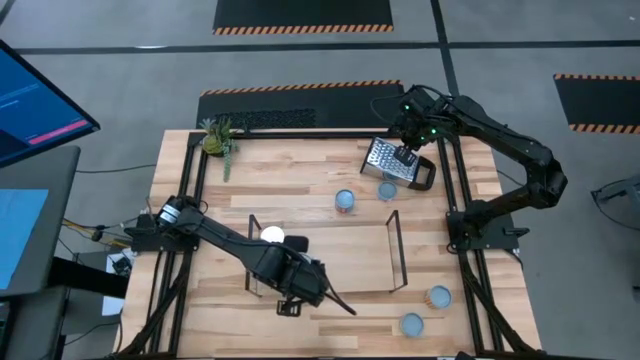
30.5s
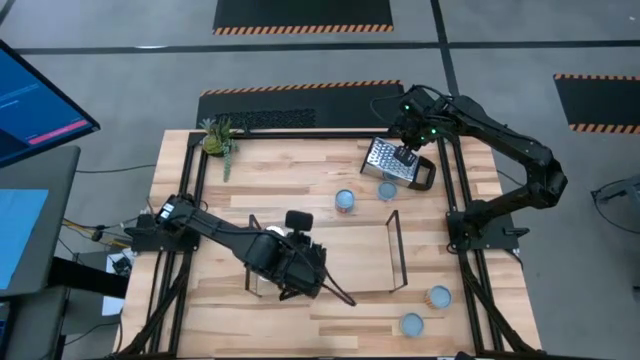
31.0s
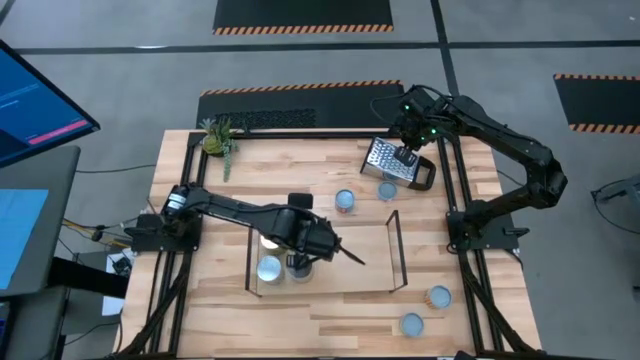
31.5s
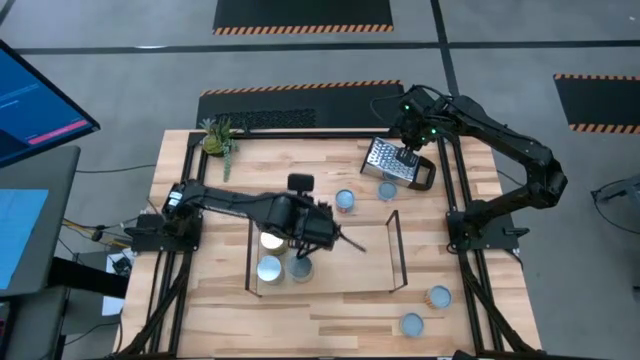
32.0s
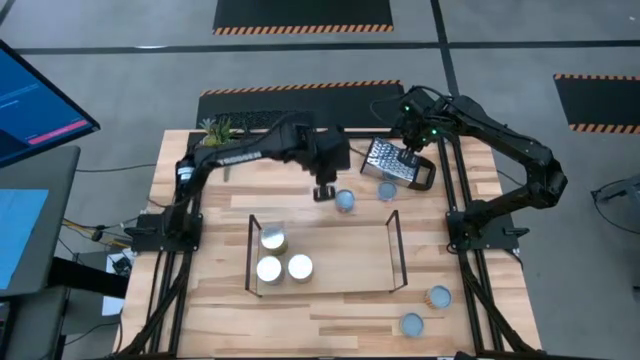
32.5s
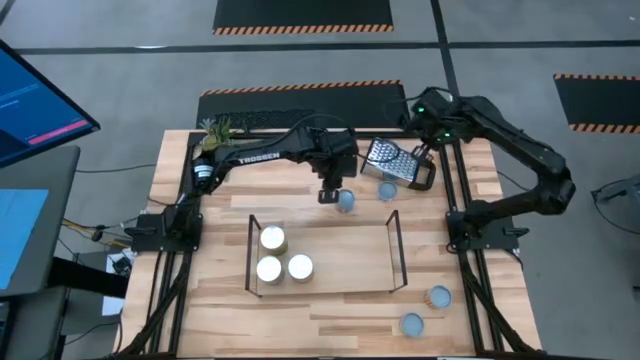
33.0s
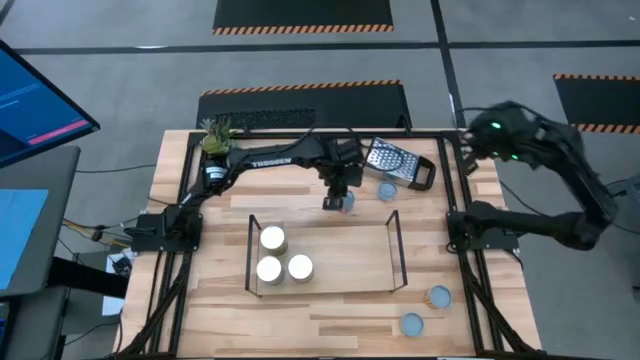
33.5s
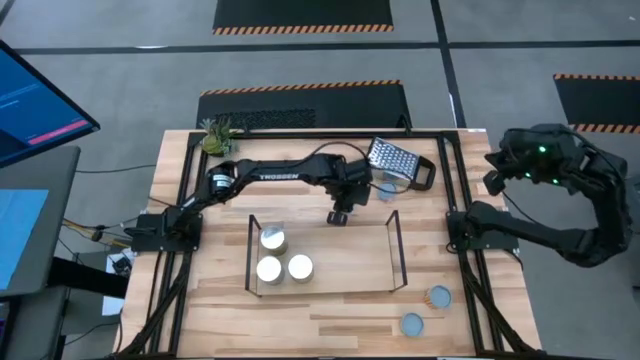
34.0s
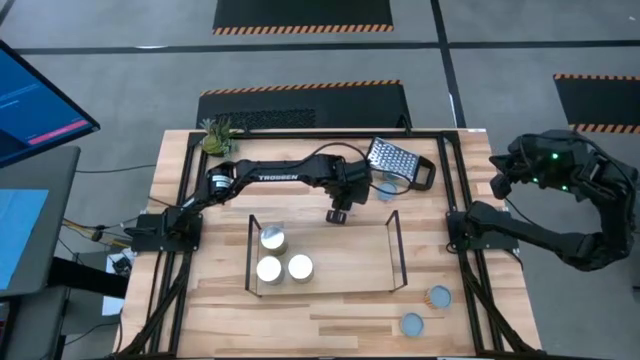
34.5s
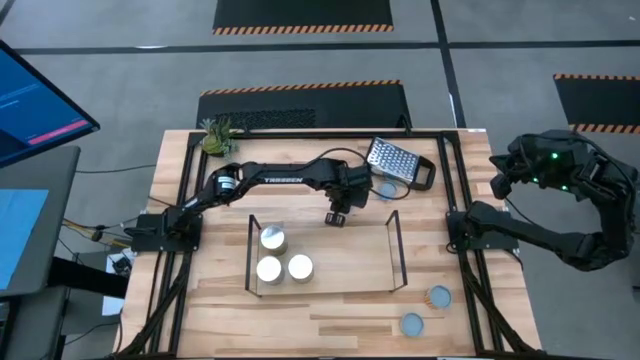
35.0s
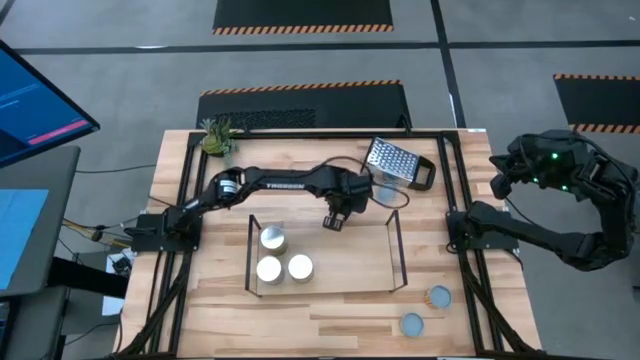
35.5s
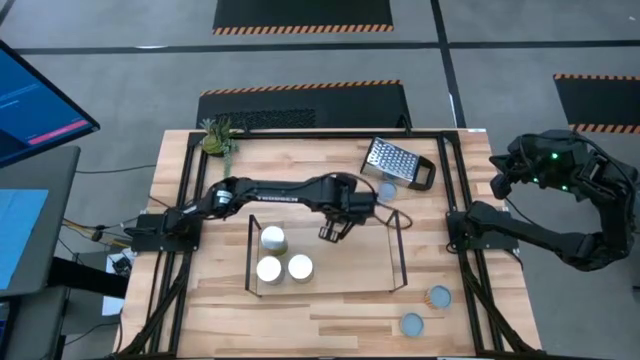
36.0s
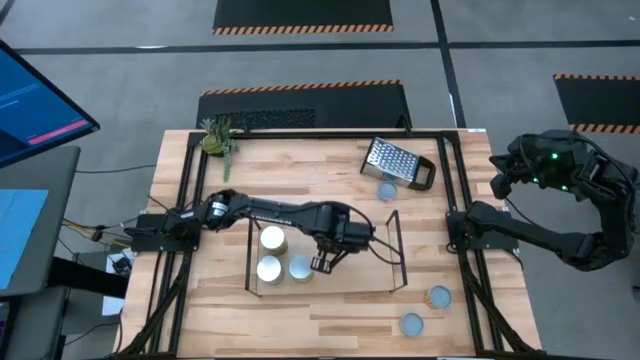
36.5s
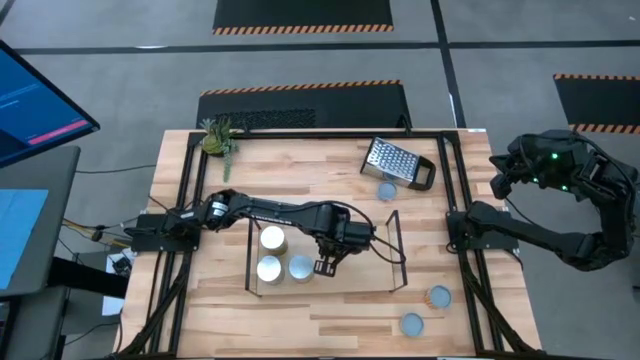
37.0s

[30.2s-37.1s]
Task: Pick and place cans onto a shelf
Put the canned spicy black beans on the shelf

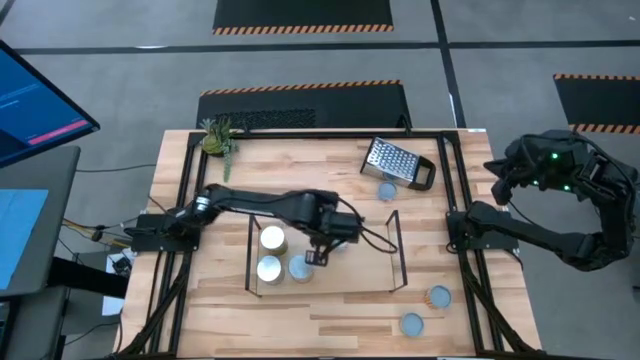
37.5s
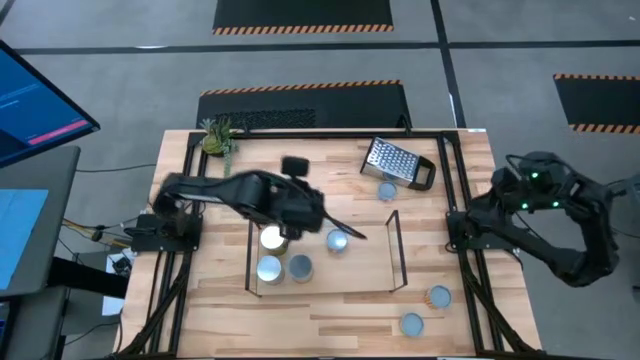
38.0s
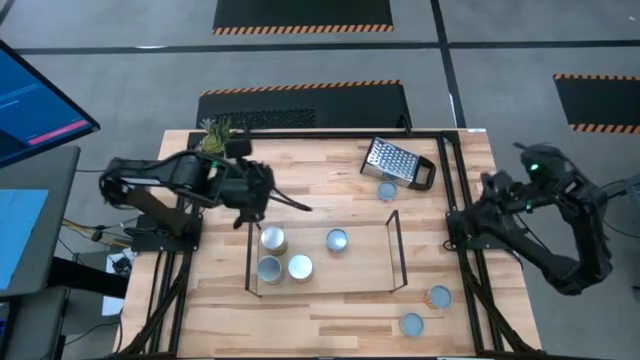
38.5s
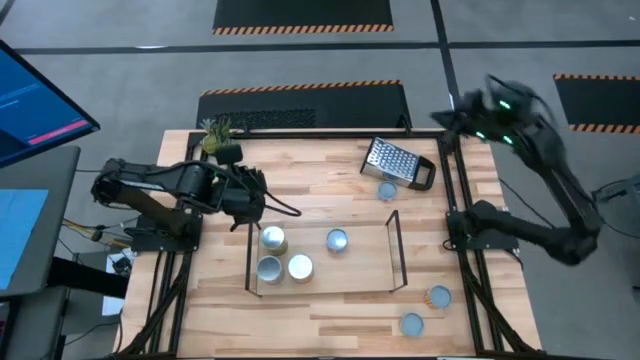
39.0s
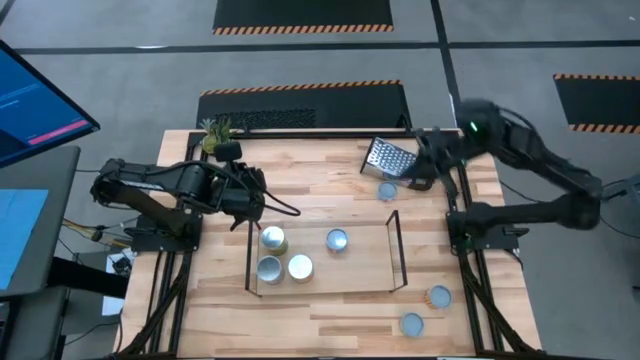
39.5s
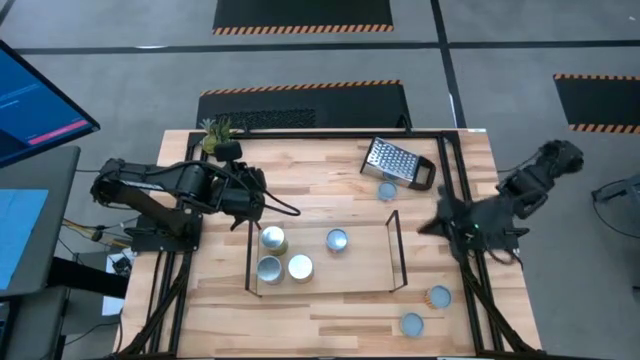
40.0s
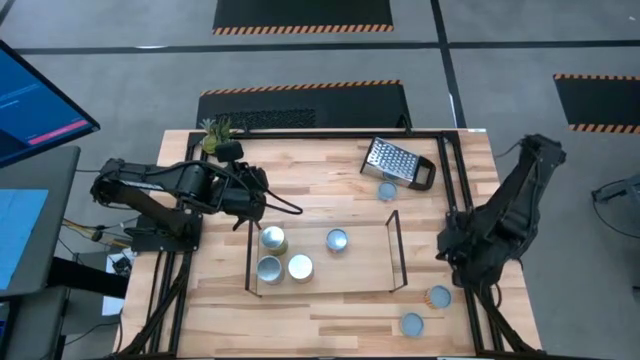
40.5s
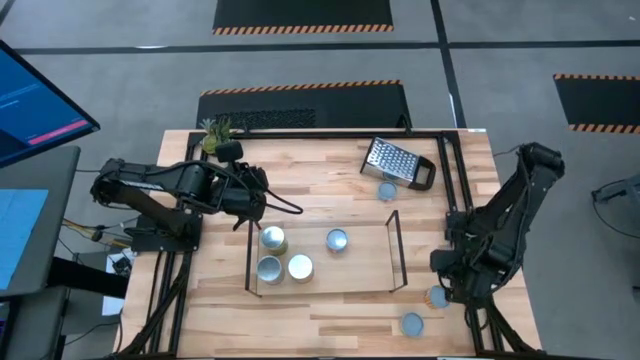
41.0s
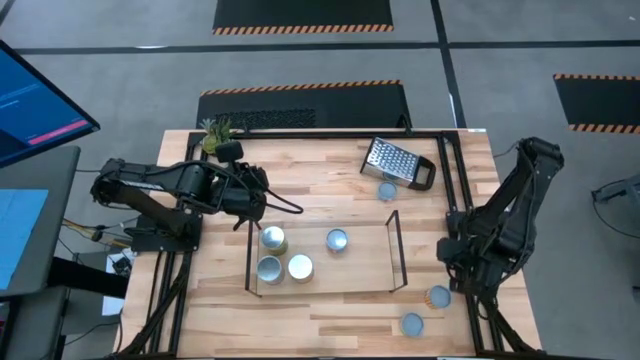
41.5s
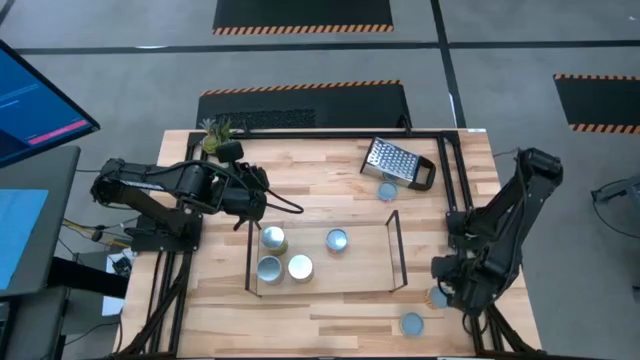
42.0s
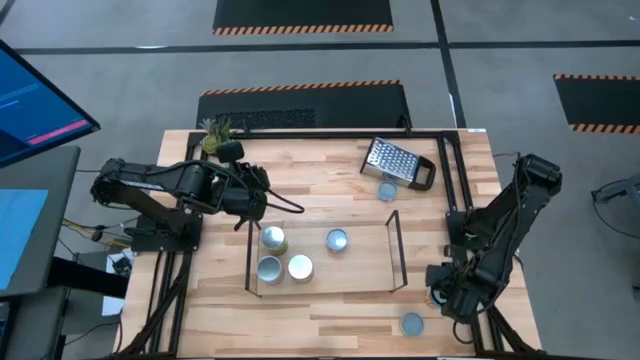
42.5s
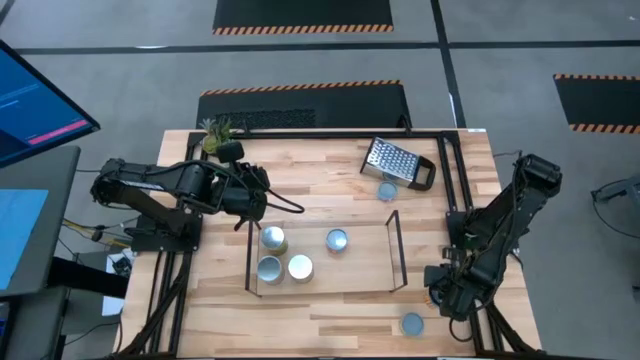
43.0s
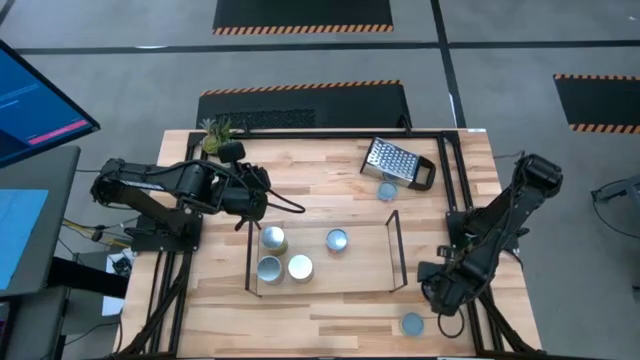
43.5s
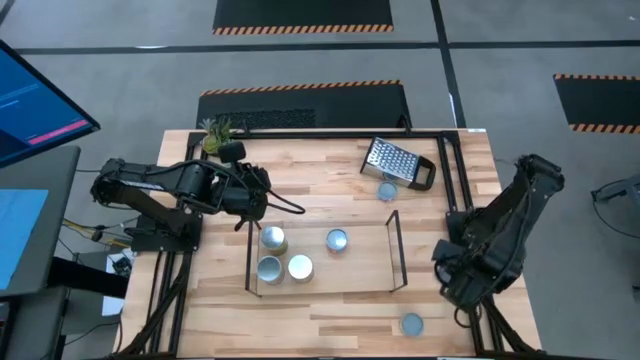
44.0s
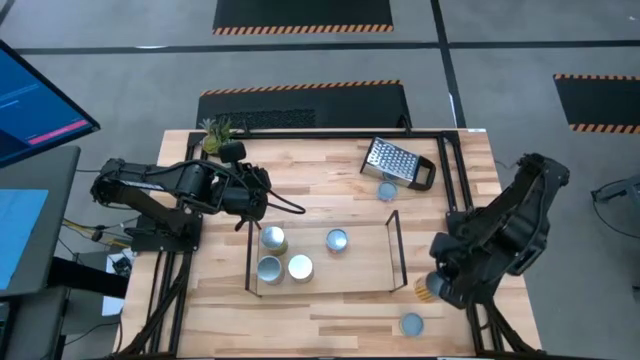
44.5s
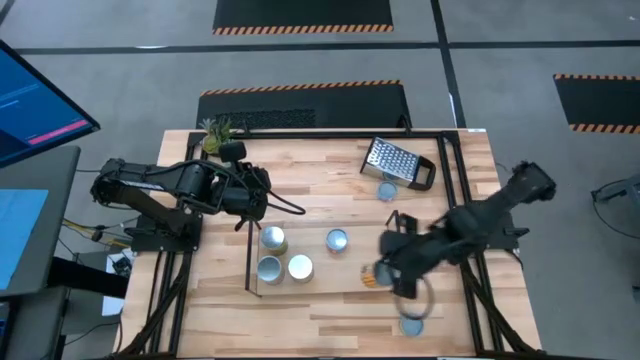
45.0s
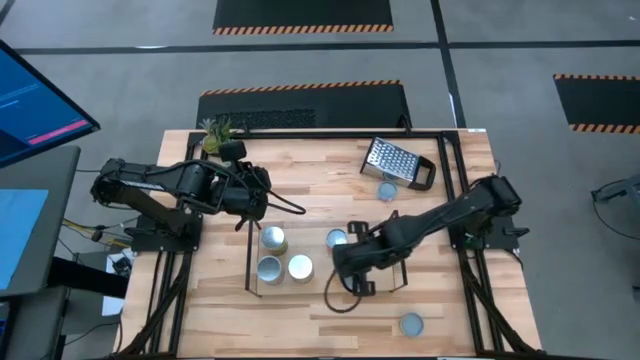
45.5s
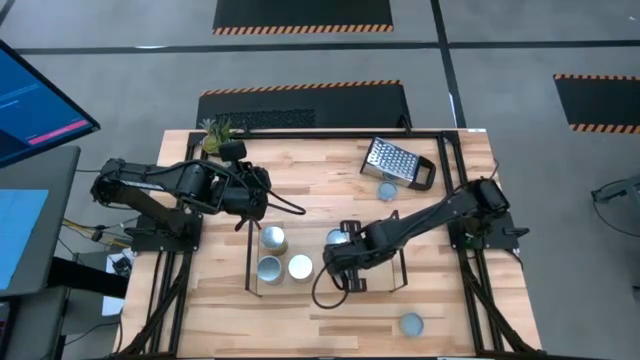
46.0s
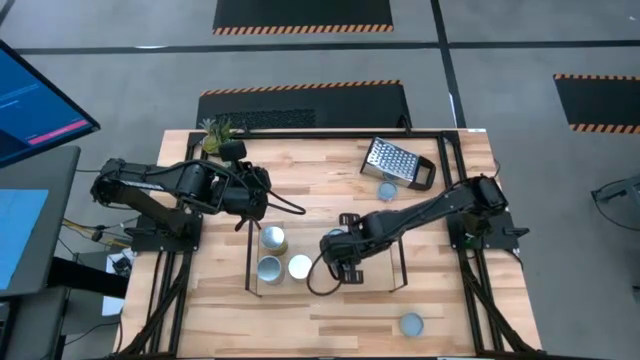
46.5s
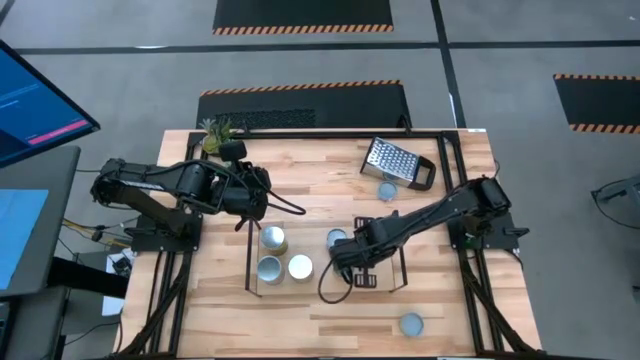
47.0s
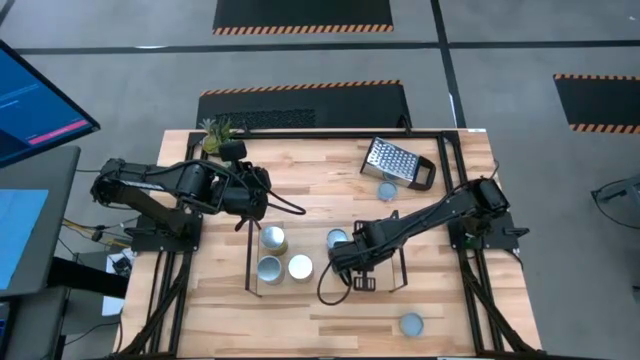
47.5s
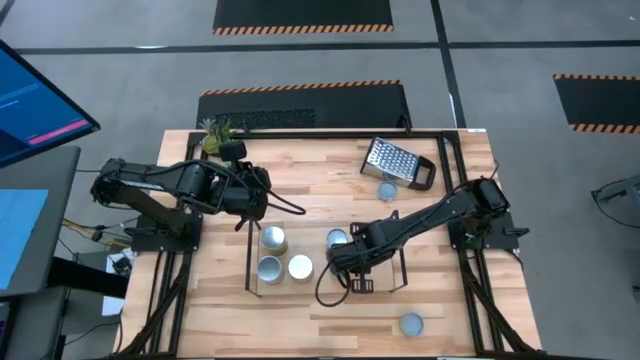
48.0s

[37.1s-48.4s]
Put the yellow can on the shelf

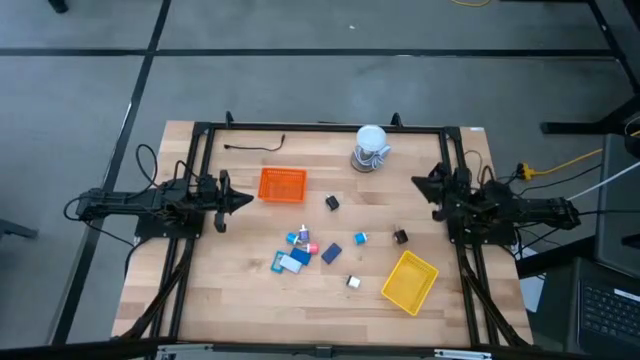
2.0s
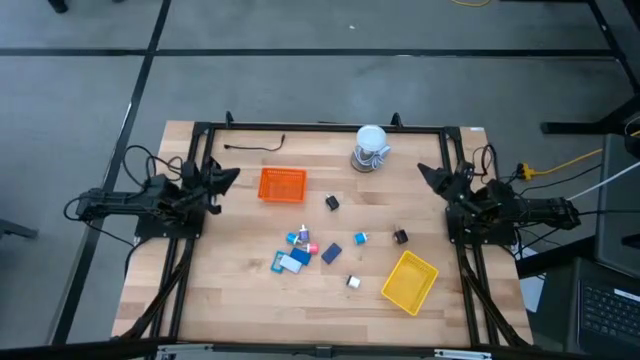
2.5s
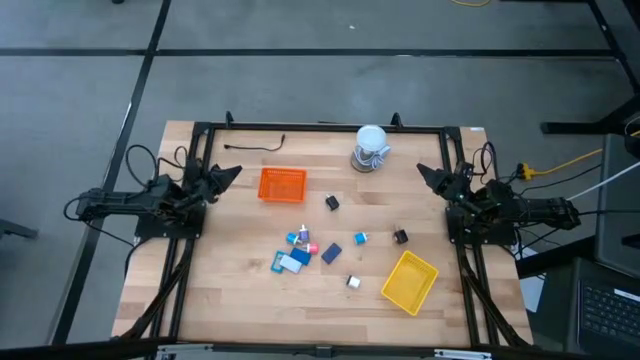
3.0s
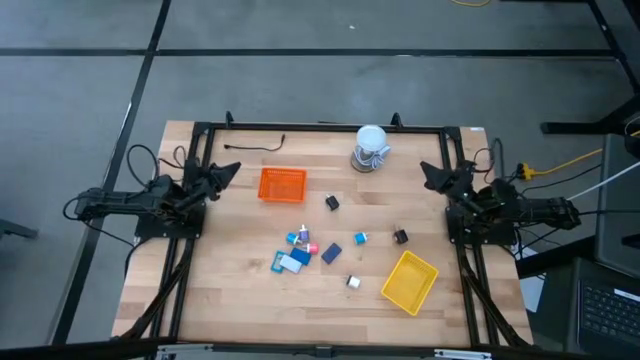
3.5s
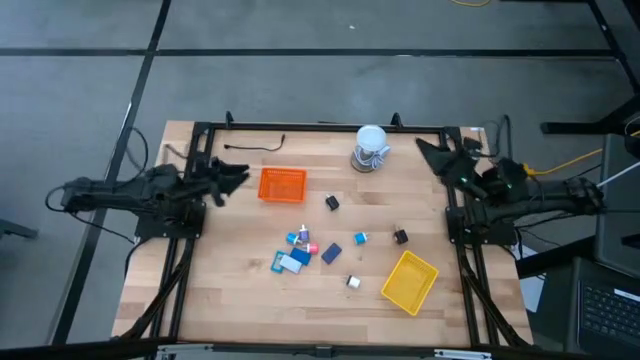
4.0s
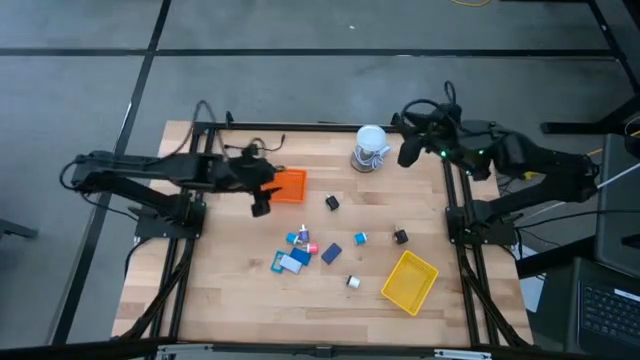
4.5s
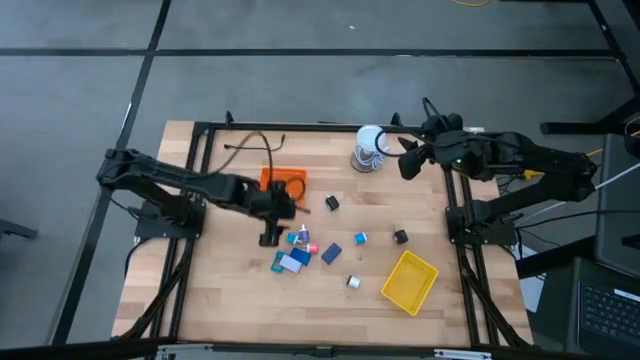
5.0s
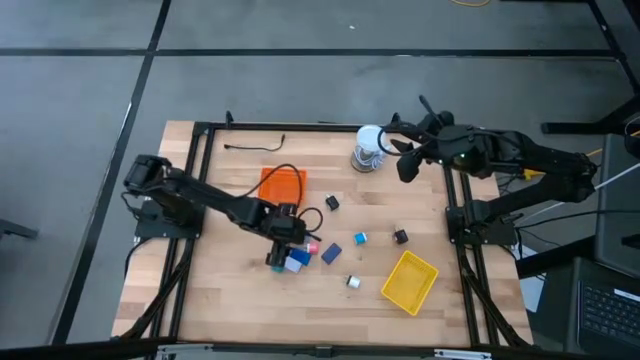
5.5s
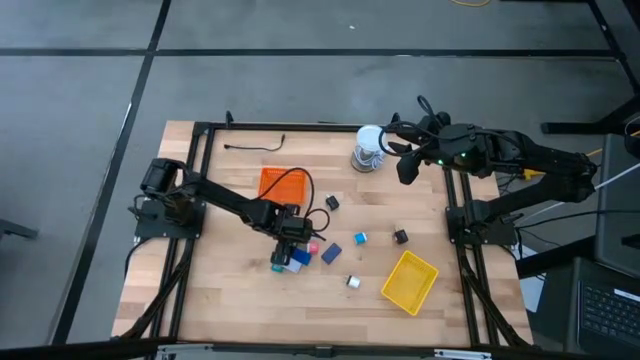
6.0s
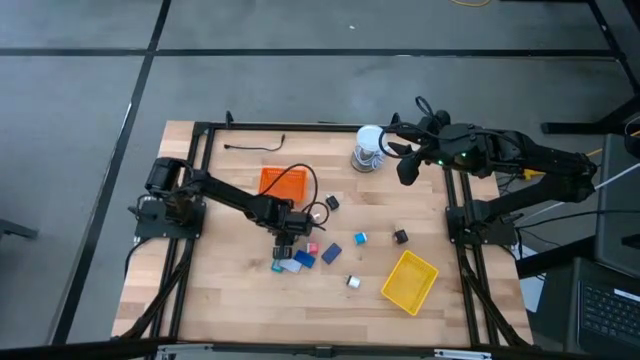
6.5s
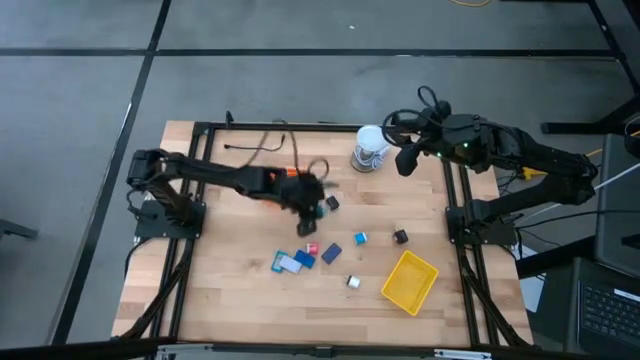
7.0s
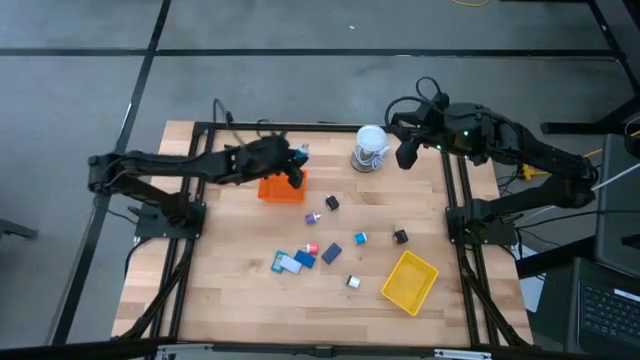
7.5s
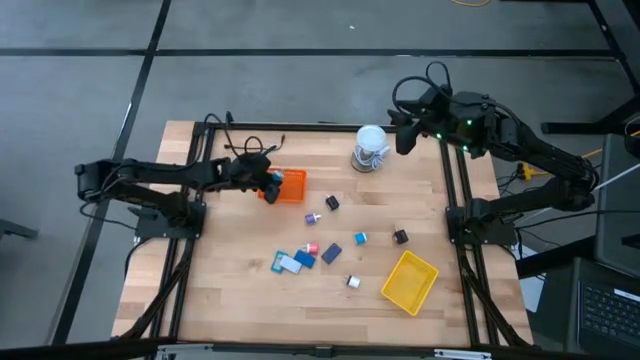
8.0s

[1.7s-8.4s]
Task: Pick & Place Office items
Put the left blue charger adapter into the orange basket
